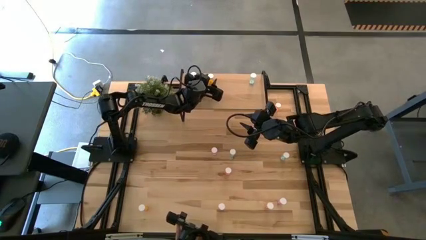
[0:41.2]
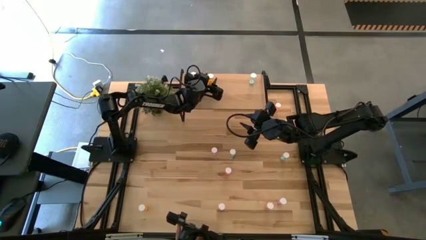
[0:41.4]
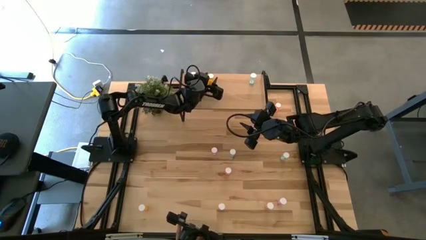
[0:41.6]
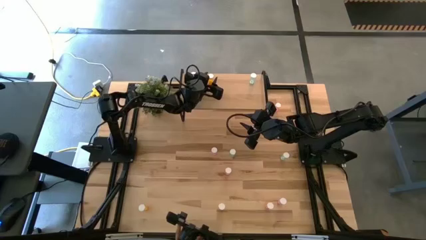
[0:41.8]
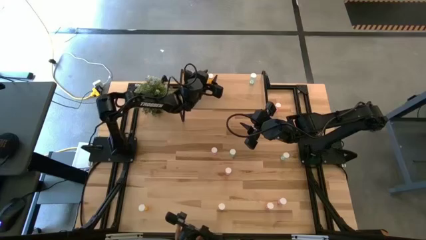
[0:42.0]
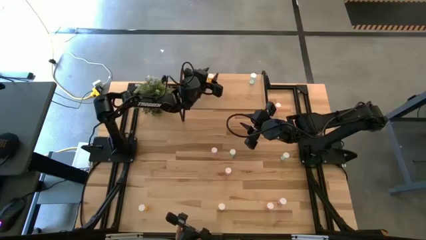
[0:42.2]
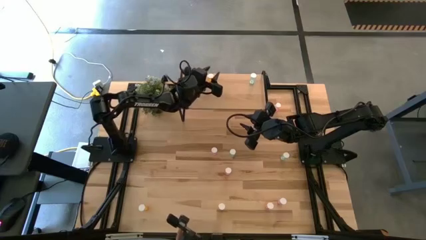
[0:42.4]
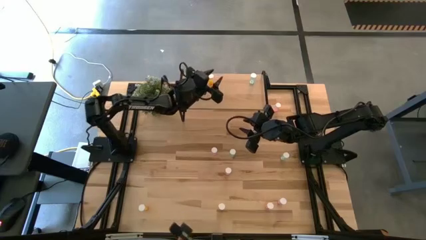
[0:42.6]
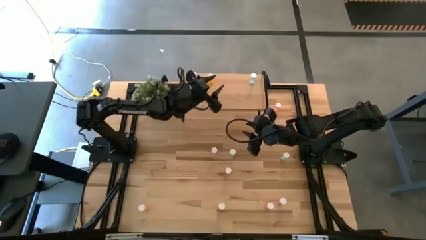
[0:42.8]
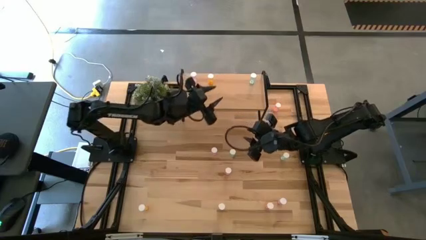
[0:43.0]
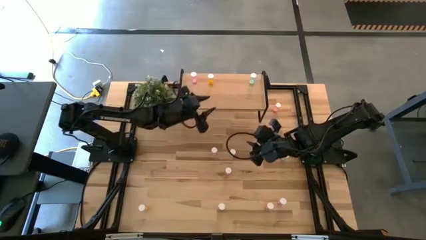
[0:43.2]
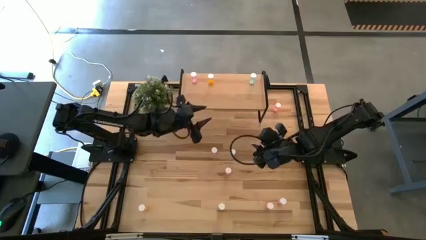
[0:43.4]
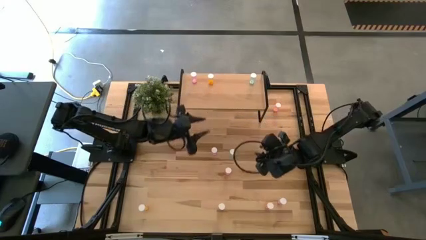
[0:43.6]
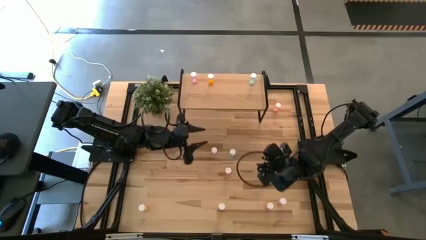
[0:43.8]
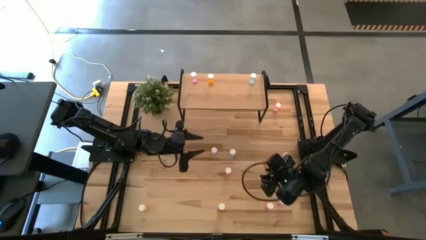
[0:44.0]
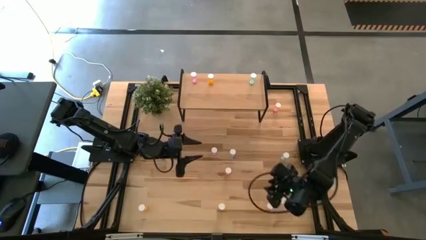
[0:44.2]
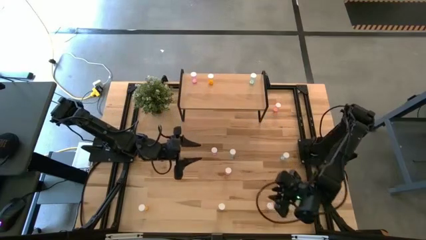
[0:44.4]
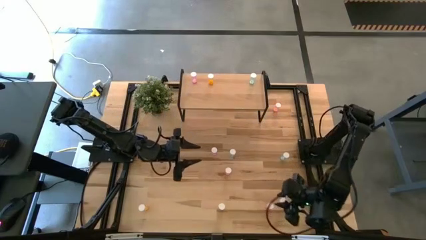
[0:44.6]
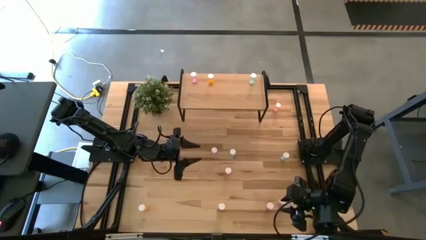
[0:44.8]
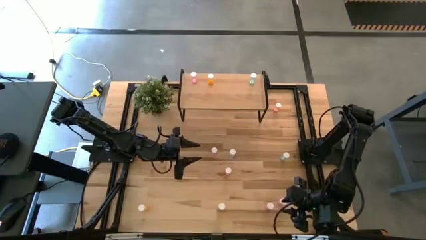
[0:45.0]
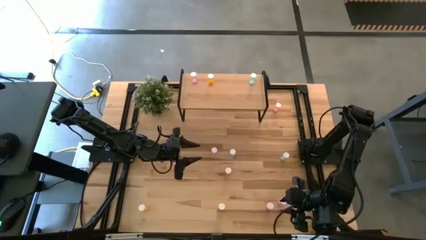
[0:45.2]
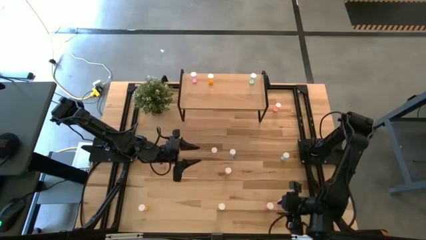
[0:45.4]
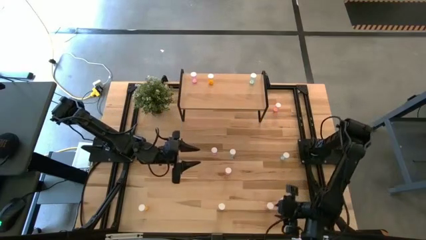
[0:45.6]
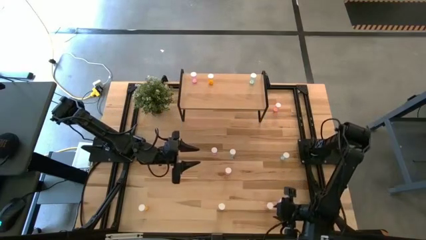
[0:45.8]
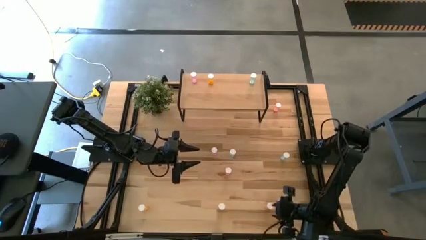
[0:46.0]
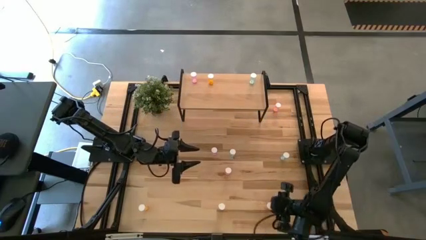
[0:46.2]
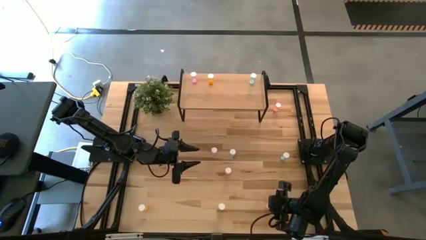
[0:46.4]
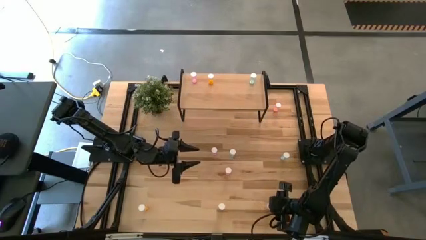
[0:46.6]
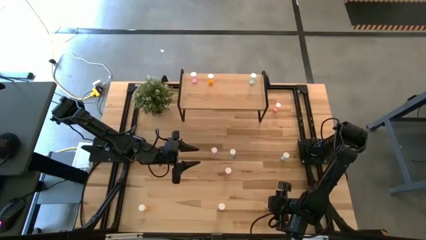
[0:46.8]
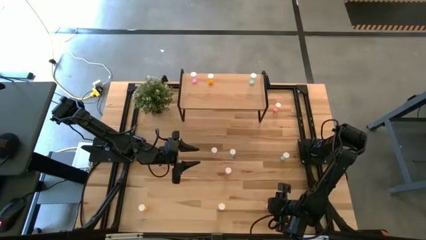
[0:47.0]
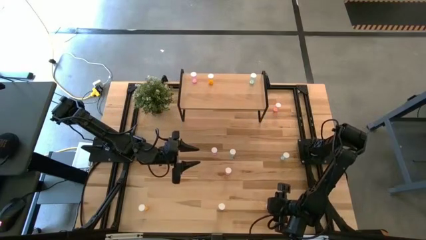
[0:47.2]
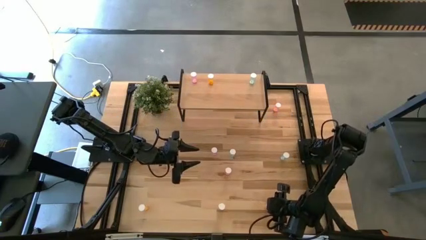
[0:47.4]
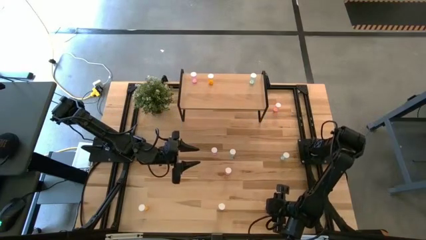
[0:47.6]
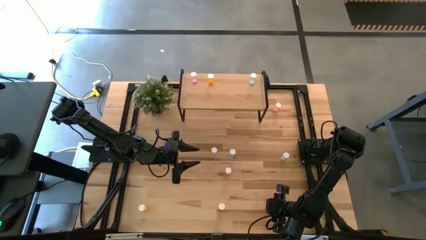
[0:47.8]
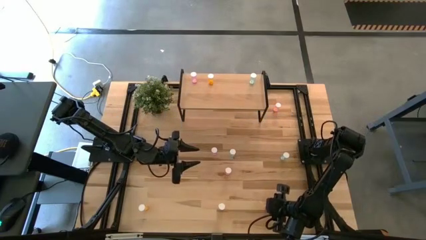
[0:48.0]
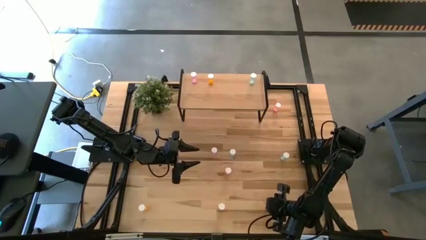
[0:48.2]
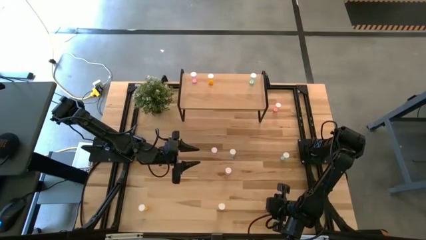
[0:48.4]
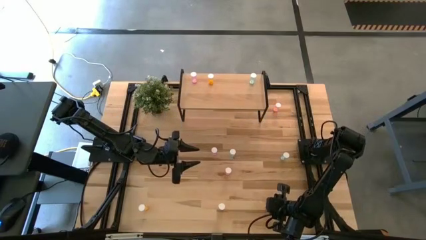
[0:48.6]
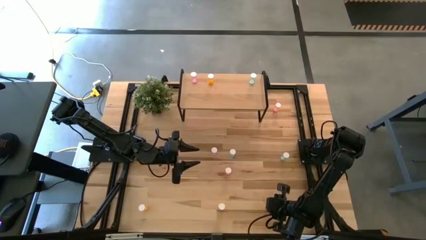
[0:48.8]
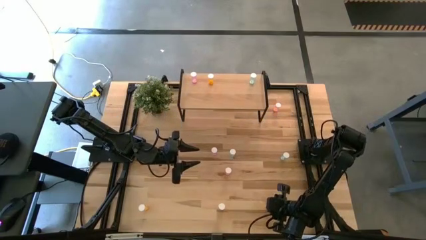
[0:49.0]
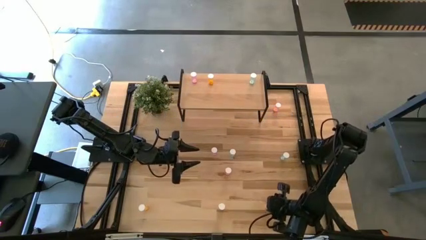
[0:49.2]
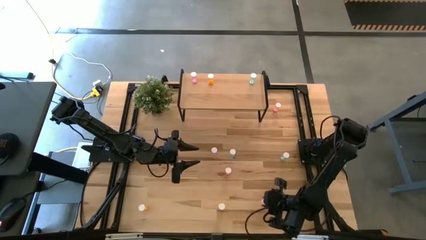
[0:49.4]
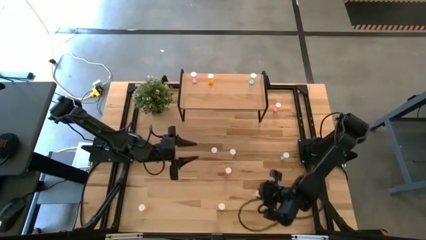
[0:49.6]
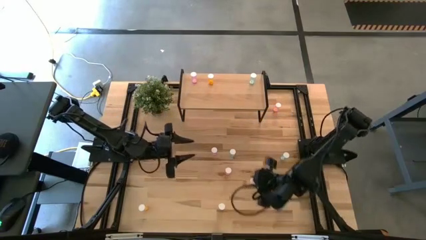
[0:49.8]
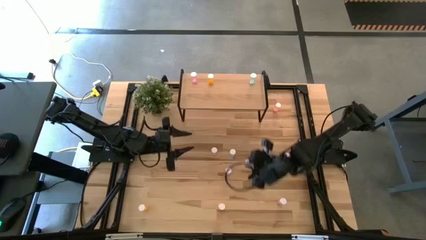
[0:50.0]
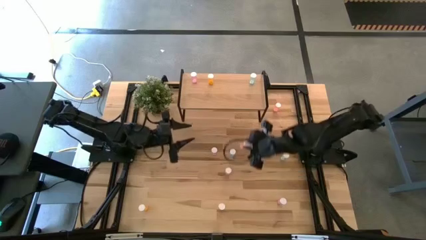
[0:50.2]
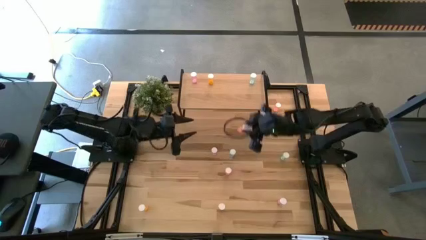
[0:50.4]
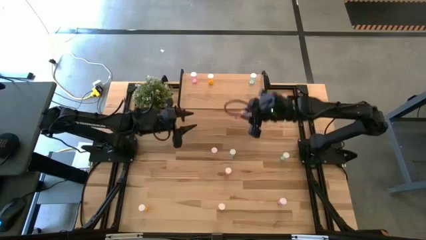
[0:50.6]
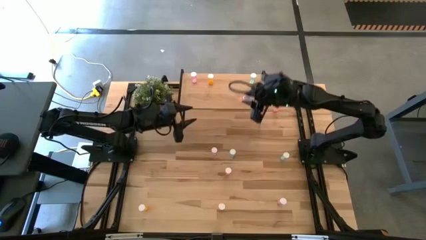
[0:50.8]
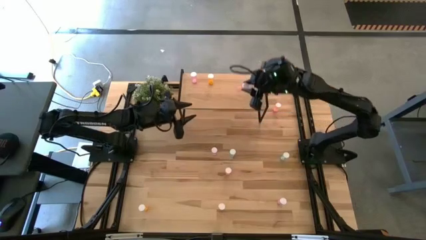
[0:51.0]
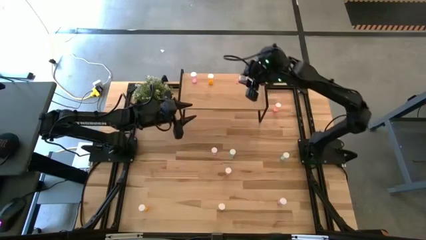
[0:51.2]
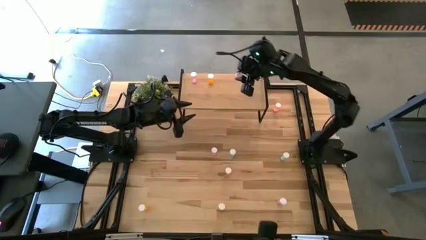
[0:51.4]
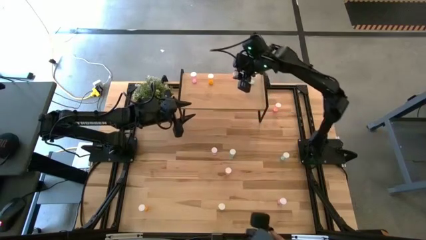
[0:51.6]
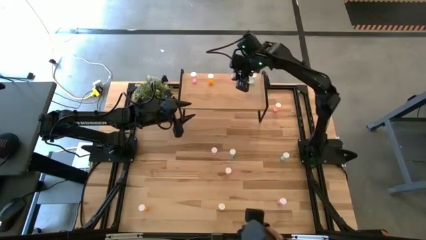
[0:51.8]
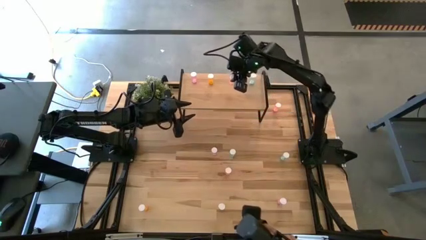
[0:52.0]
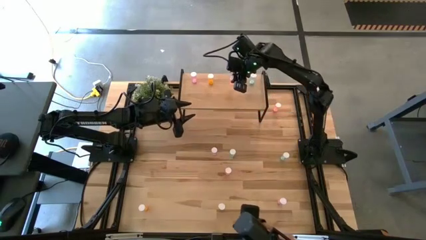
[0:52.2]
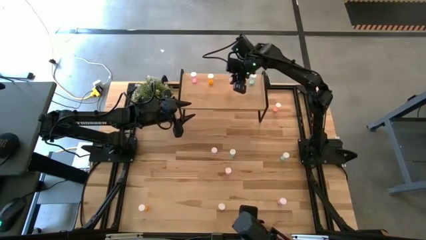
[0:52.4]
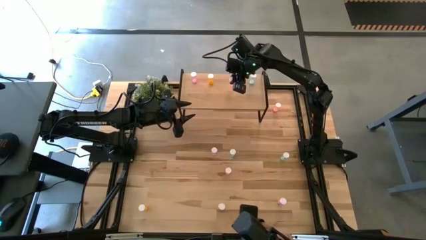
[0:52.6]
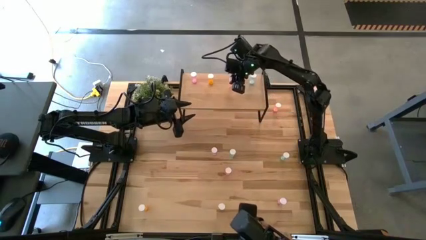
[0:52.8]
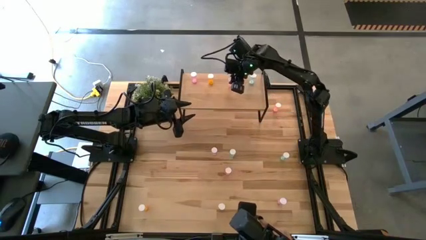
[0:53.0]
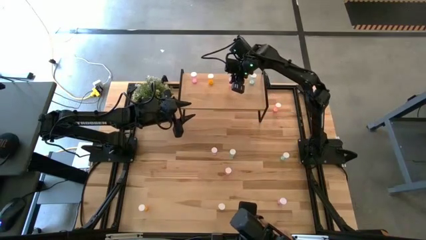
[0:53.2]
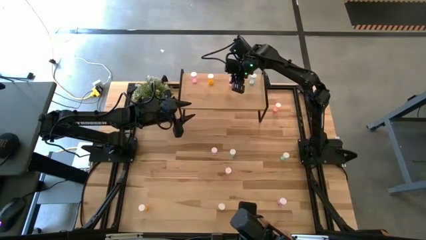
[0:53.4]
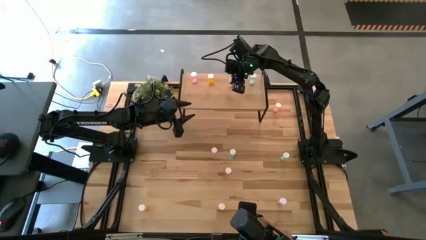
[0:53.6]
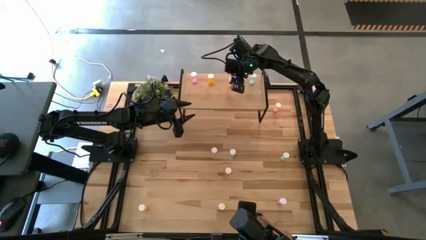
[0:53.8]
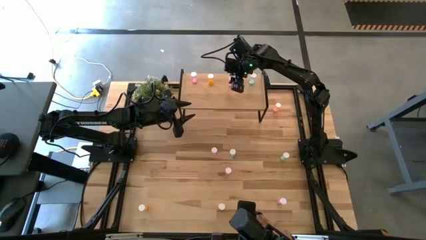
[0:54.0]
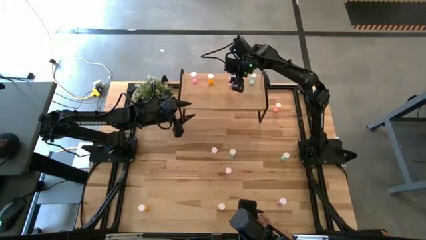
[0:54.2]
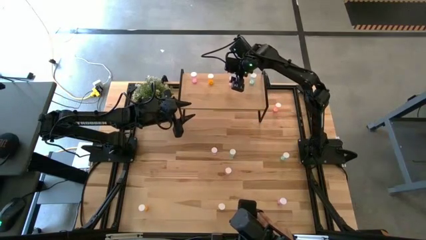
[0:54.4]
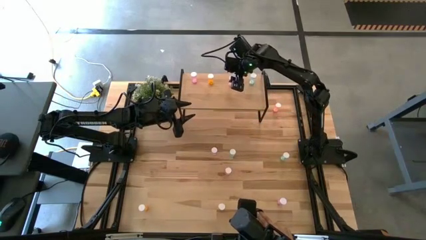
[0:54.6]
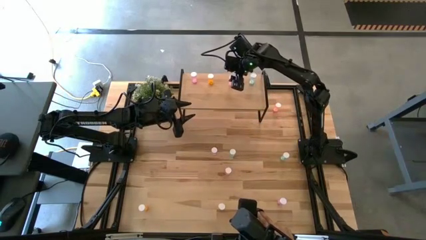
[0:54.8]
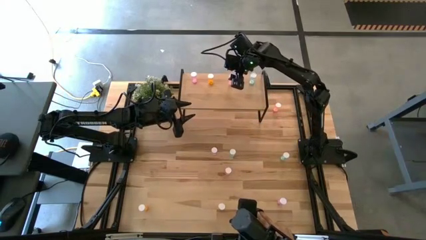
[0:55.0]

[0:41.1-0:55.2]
Task: Pick and place medicine bottles onto shelf by color
Put the bottom red pill bottle on the shelf
